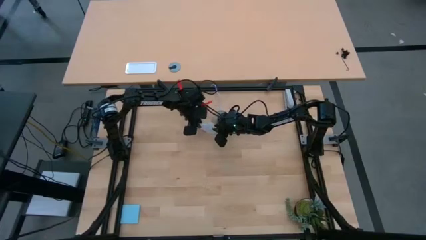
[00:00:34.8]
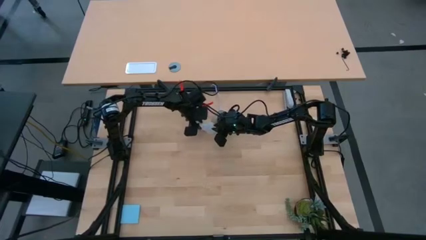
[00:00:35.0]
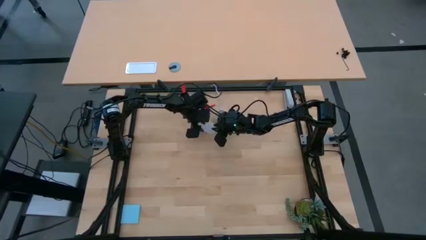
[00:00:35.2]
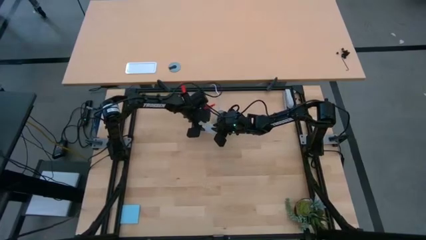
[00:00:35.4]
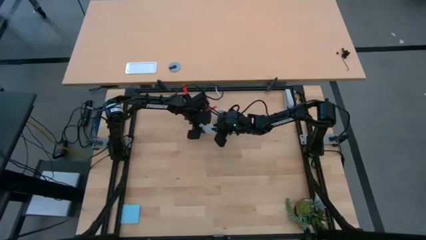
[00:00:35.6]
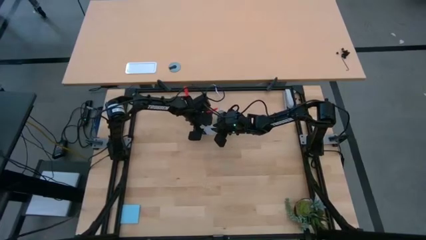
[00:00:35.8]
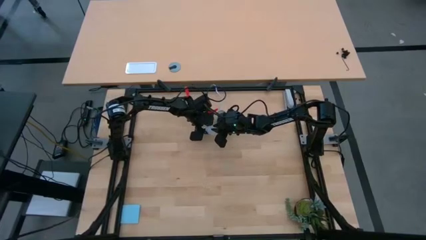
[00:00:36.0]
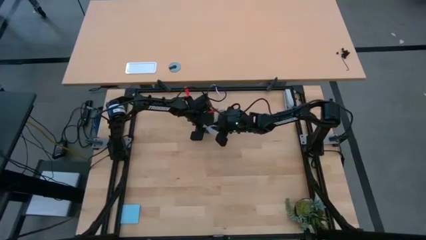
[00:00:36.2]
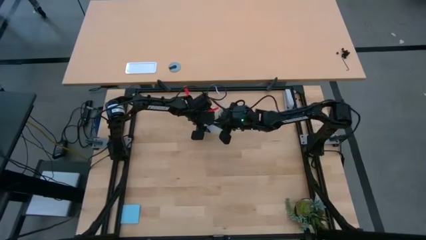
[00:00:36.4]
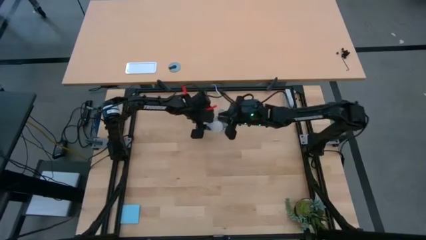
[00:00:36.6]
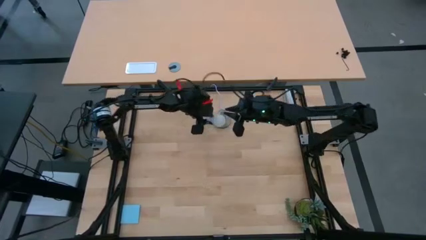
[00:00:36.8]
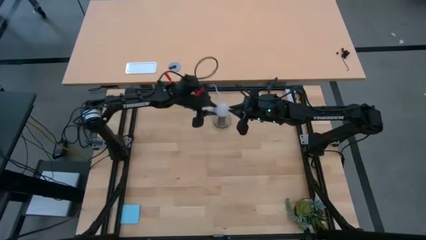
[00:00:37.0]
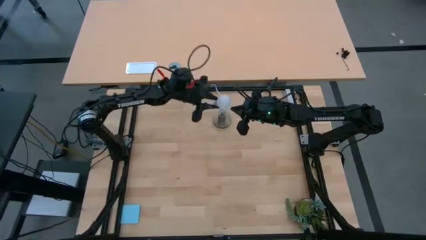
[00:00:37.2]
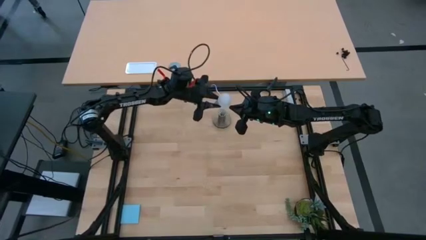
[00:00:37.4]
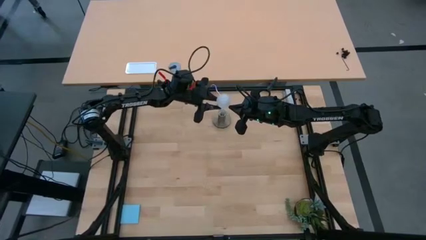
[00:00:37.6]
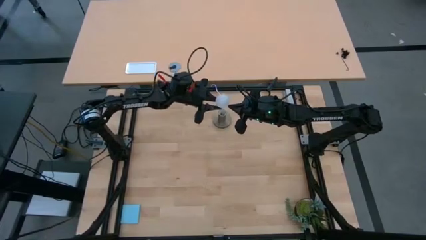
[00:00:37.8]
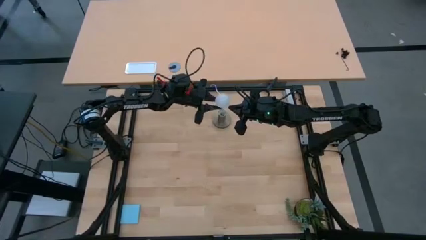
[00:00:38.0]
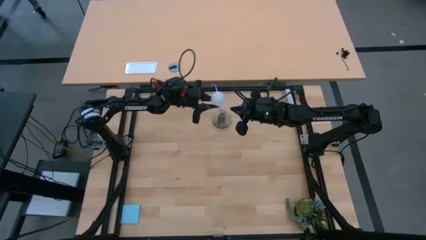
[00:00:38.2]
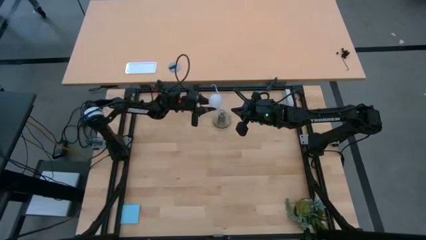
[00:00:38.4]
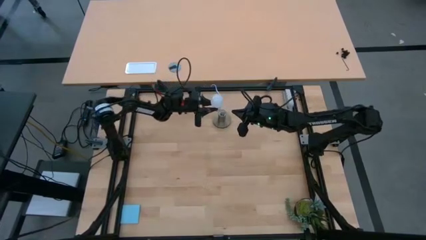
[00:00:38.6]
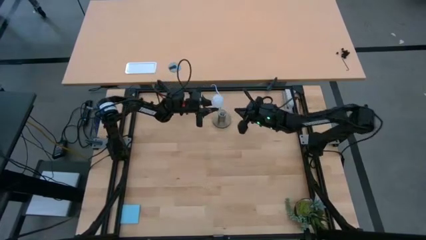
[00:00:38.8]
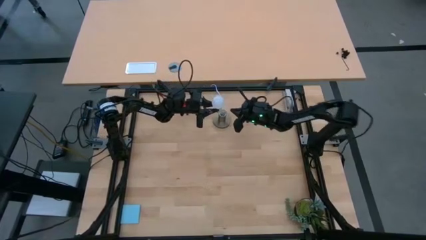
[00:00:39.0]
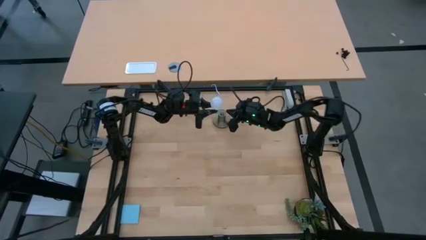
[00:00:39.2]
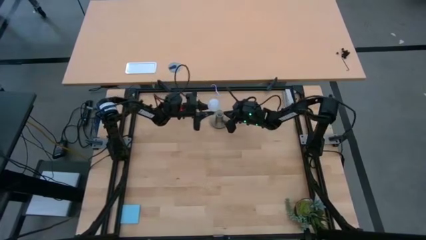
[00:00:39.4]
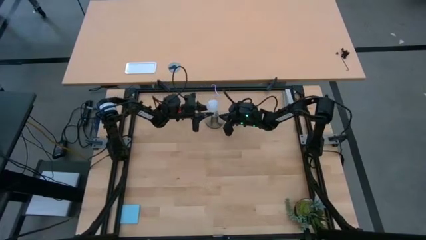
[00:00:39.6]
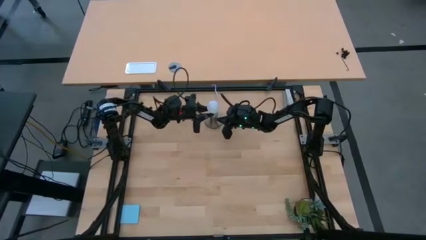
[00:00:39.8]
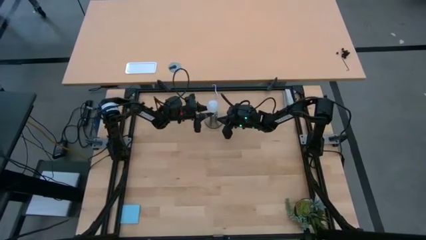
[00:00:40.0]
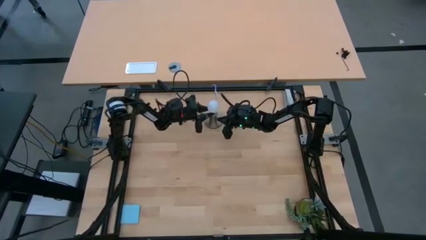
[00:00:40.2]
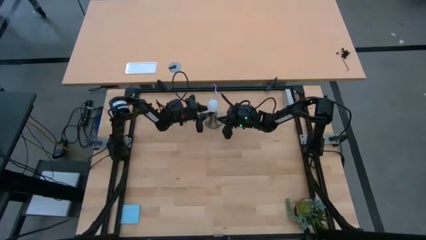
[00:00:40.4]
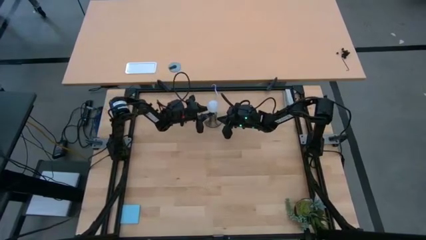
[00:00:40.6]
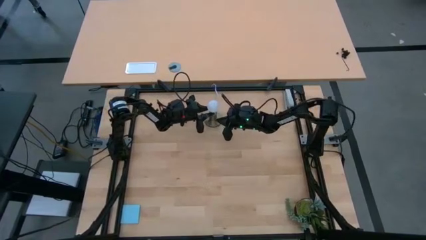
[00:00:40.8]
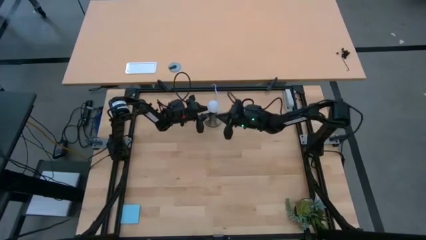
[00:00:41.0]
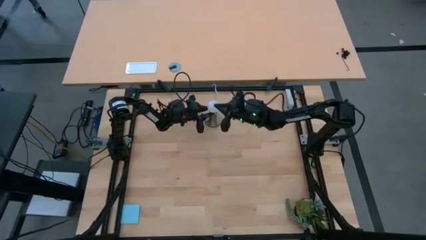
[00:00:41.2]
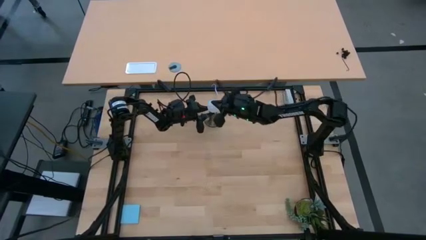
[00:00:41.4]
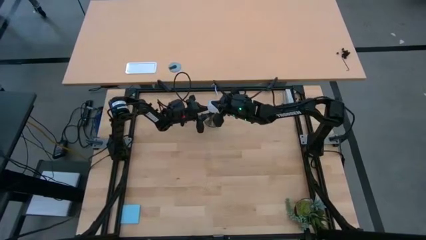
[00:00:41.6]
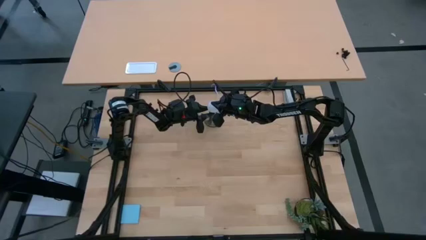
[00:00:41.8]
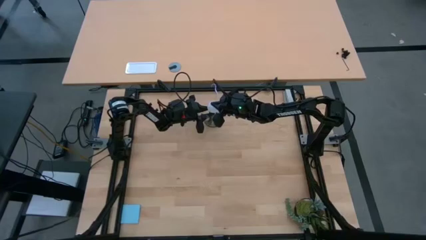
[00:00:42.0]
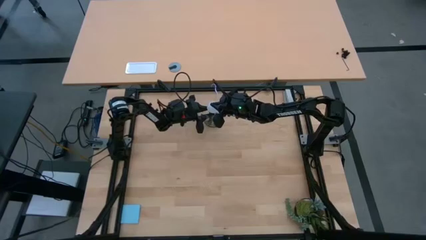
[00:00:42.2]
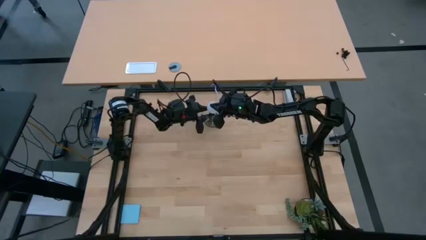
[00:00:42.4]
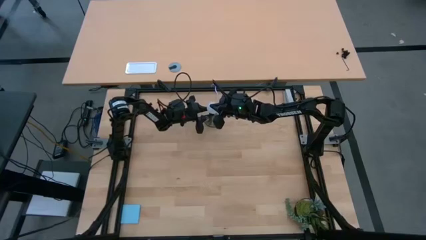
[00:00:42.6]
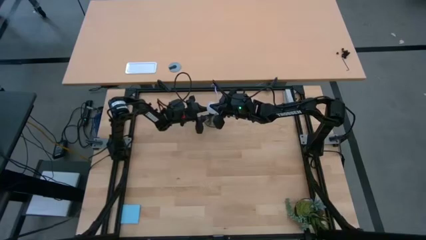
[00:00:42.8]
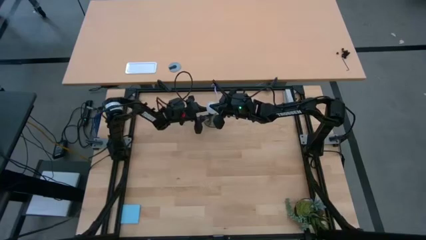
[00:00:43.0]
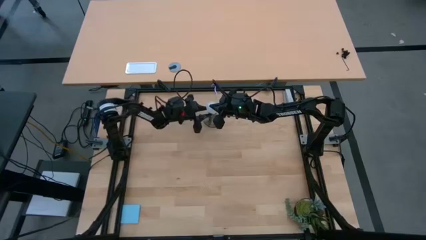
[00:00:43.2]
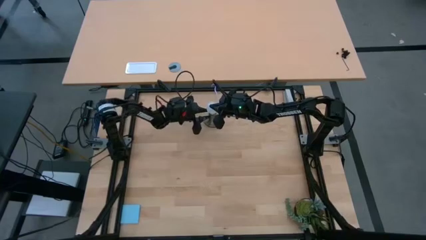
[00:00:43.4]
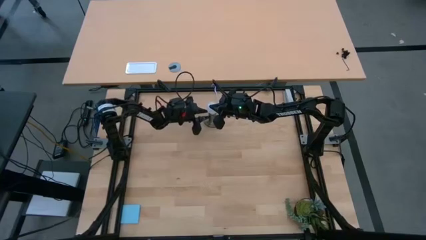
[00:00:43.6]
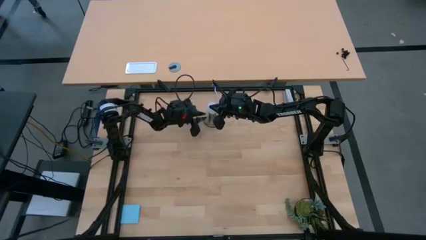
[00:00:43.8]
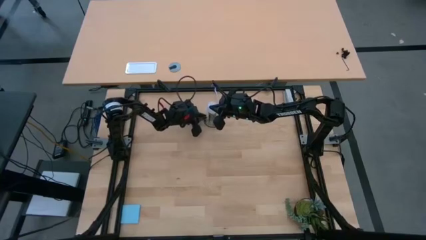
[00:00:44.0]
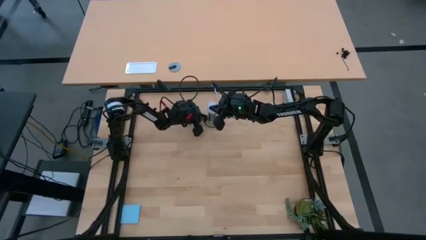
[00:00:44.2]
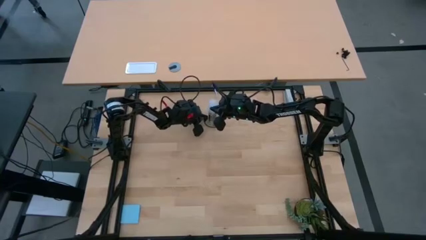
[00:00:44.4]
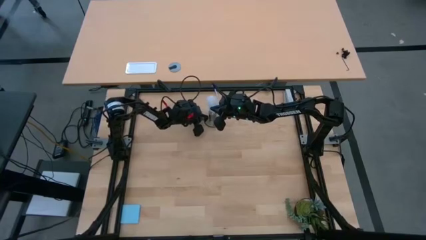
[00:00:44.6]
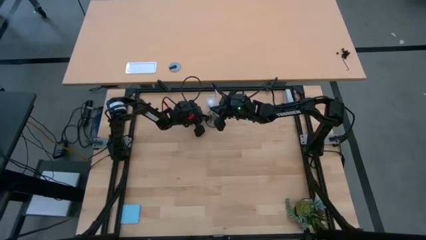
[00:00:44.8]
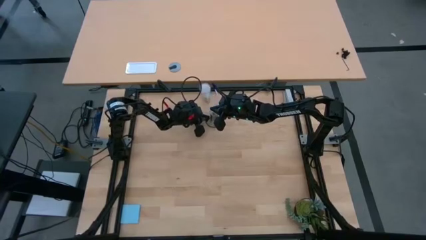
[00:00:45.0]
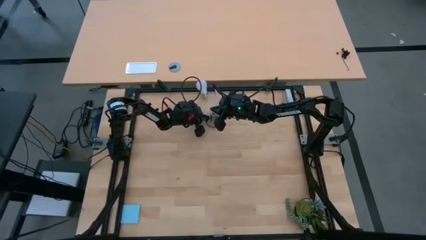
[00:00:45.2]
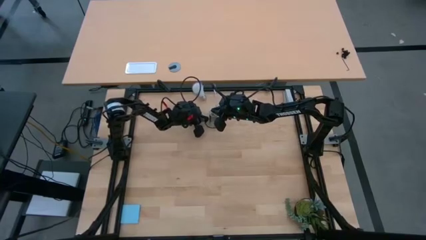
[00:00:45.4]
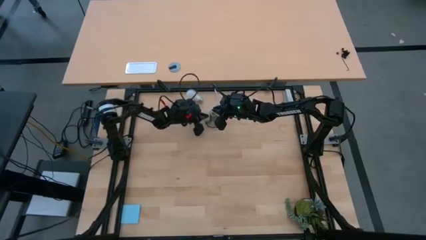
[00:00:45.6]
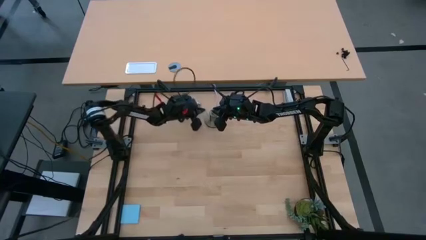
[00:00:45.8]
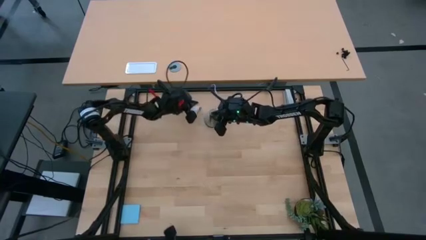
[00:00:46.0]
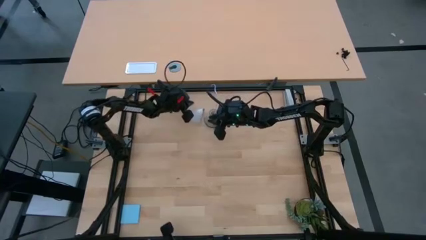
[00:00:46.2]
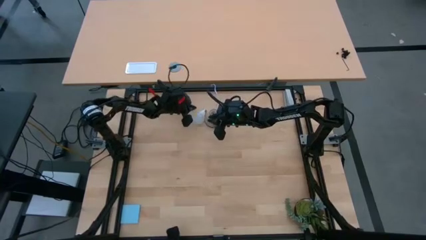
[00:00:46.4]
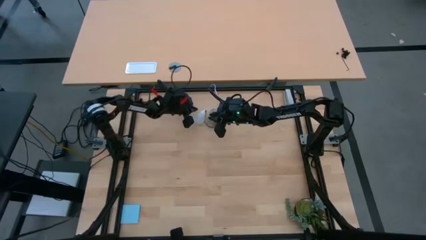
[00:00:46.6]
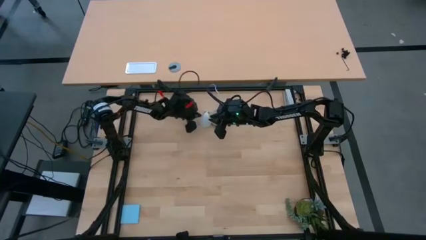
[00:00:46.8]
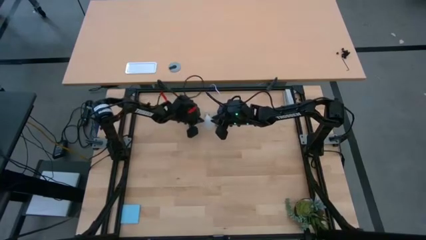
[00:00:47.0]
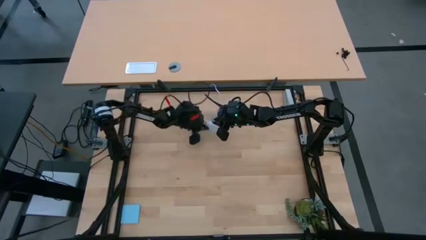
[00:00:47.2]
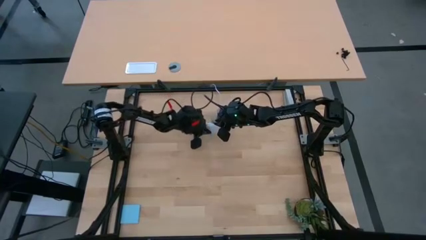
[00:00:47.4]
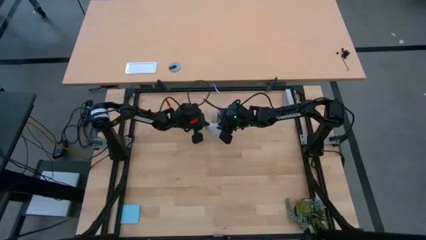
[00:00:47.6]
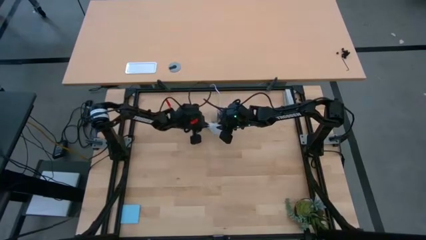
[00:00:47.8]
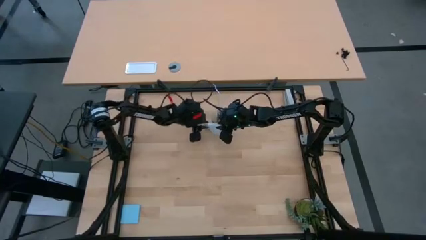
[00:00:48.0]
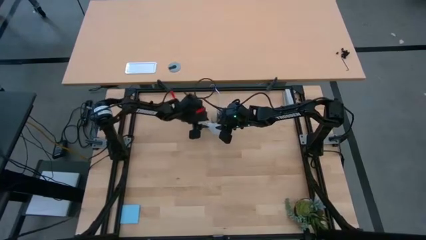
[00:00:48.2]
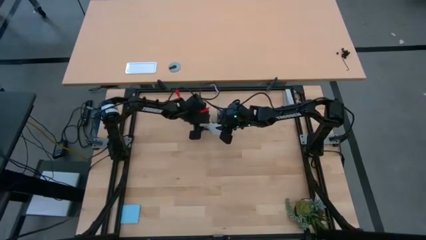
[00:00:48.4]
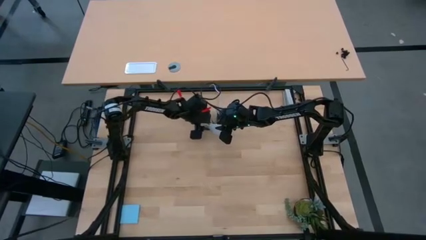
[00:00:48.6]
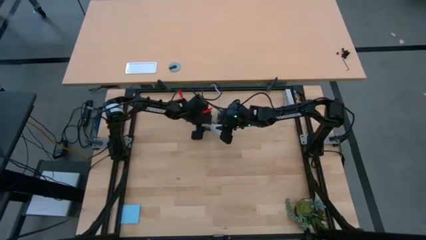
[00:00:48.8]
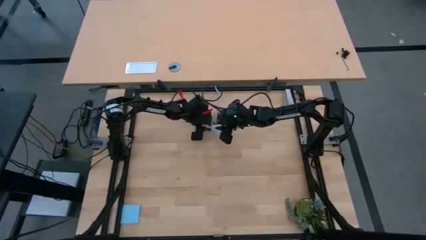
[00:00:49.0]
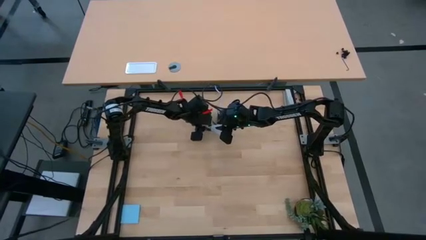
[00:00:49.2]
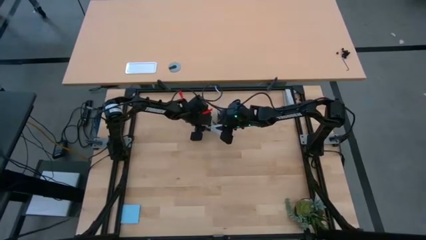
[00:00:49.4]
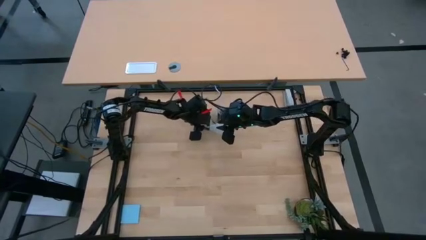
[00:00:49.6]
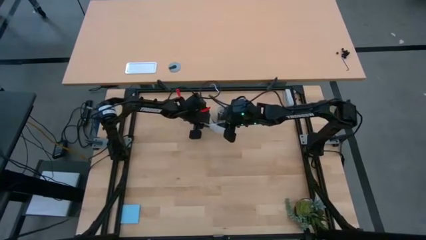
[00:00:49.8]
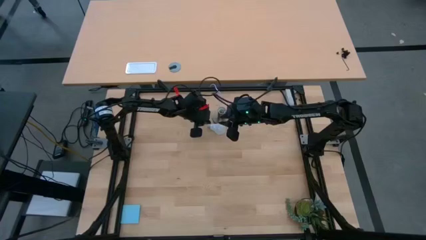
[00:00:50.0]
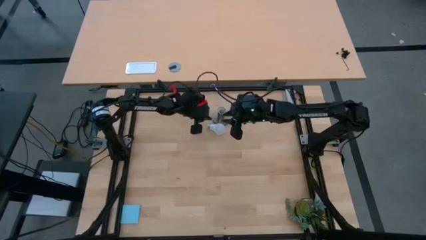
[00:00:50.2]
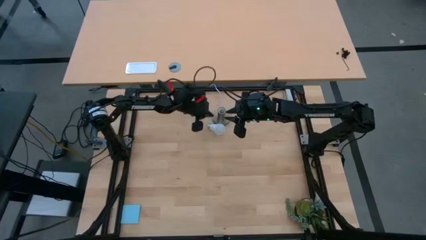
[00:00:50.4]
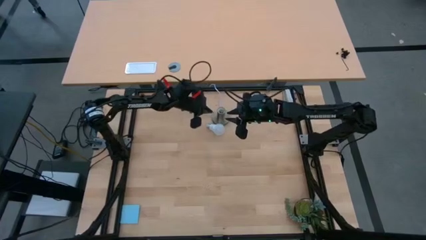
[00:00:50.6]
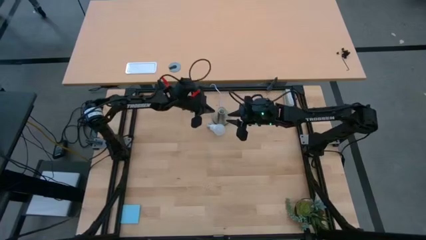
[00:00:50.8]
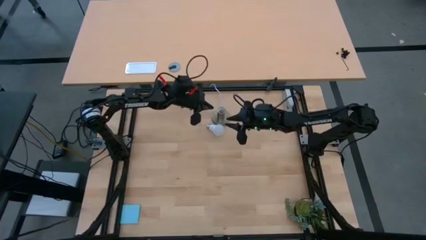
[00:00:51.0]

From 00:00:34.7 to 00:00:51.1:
Task: Screw lightbulb
Insert the light bulb into the table lamp holder
